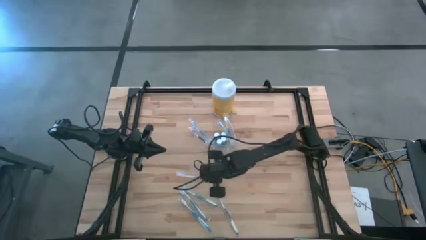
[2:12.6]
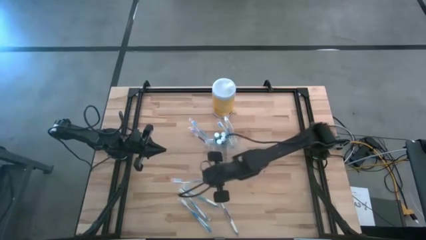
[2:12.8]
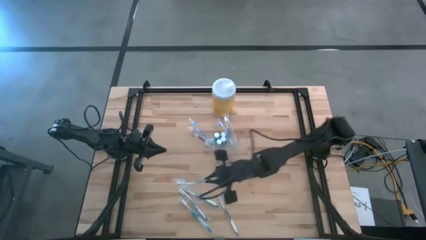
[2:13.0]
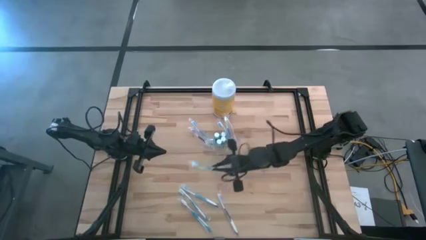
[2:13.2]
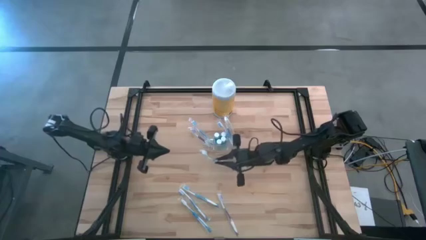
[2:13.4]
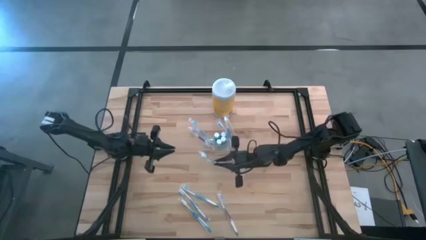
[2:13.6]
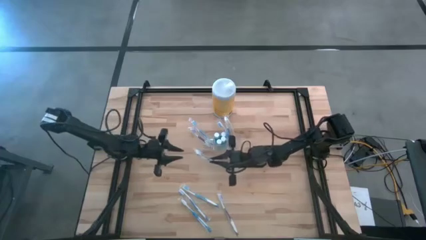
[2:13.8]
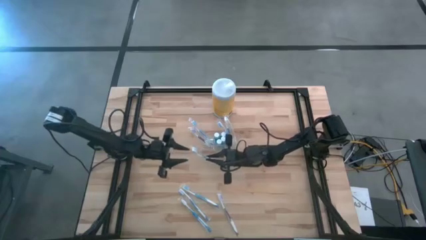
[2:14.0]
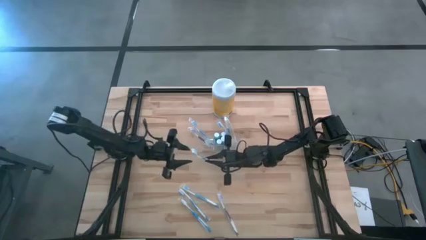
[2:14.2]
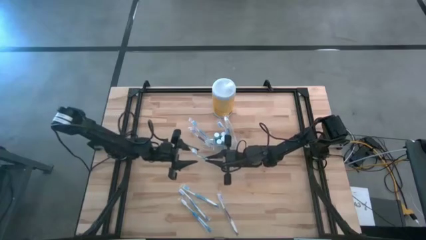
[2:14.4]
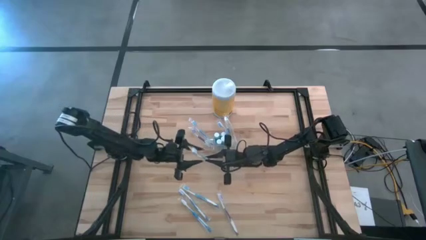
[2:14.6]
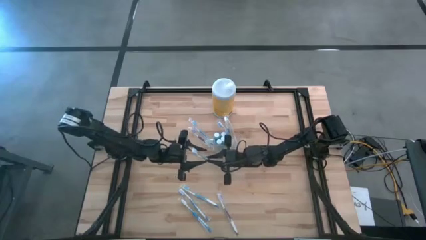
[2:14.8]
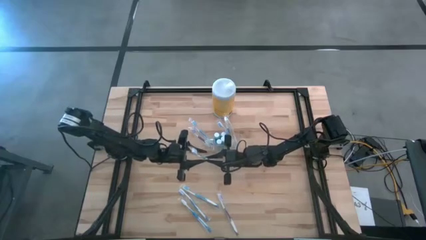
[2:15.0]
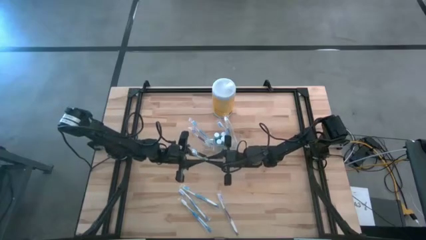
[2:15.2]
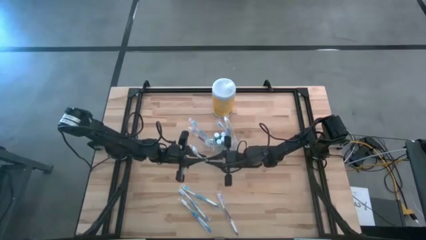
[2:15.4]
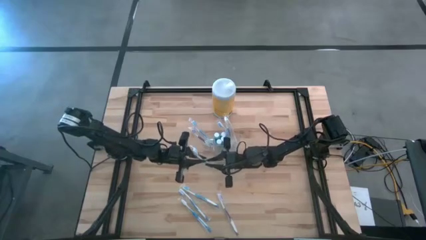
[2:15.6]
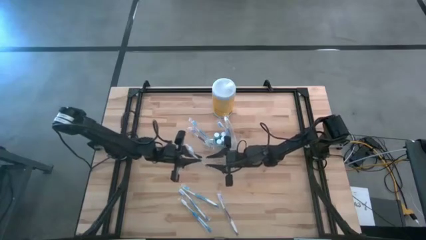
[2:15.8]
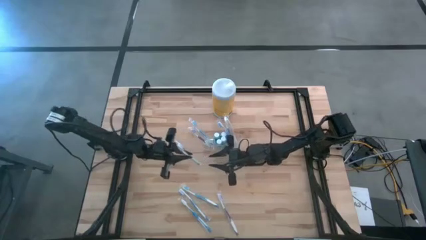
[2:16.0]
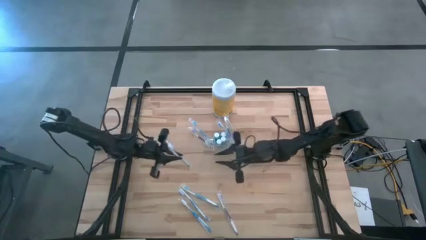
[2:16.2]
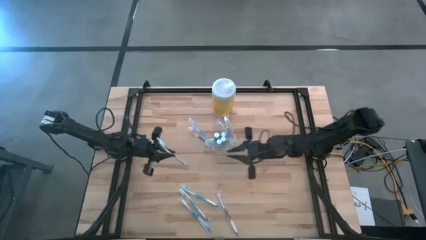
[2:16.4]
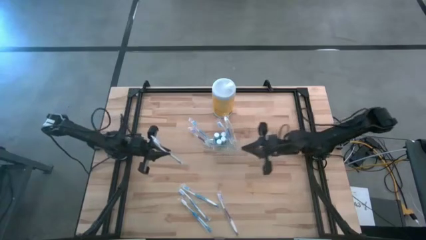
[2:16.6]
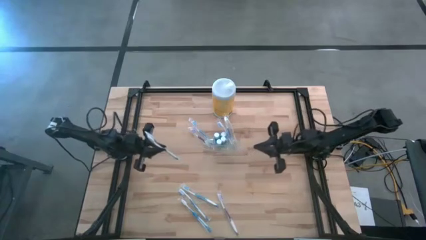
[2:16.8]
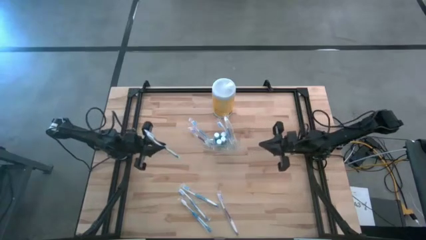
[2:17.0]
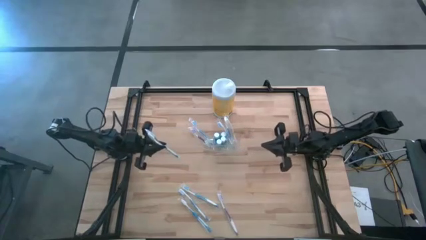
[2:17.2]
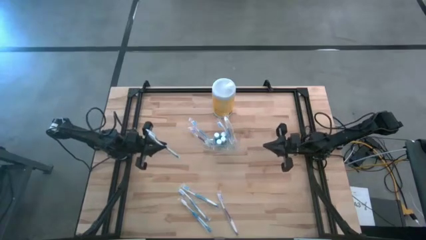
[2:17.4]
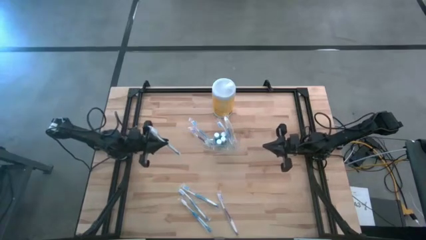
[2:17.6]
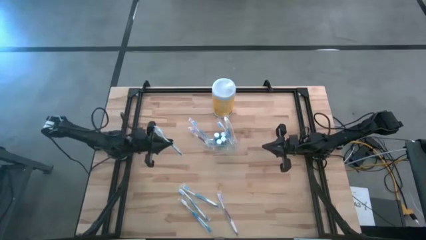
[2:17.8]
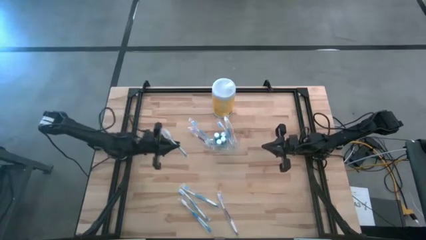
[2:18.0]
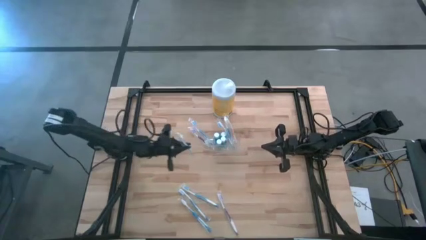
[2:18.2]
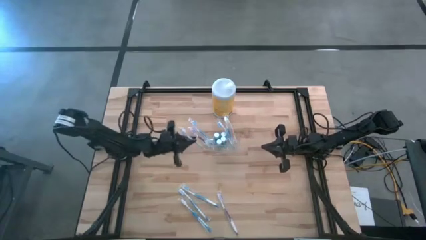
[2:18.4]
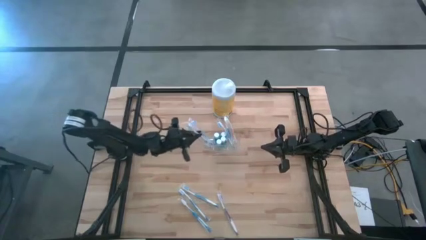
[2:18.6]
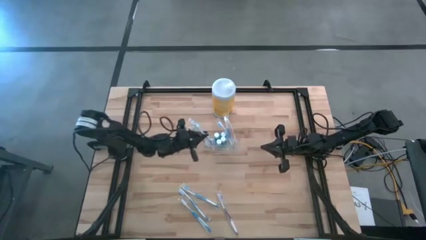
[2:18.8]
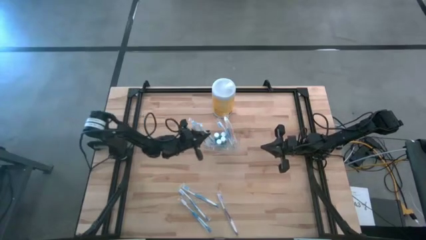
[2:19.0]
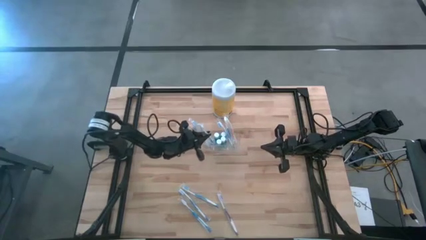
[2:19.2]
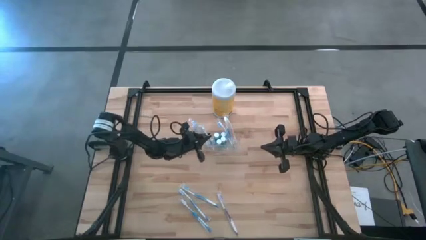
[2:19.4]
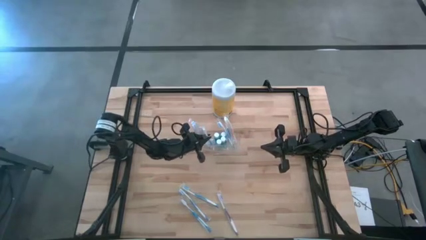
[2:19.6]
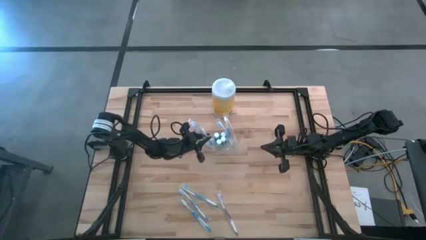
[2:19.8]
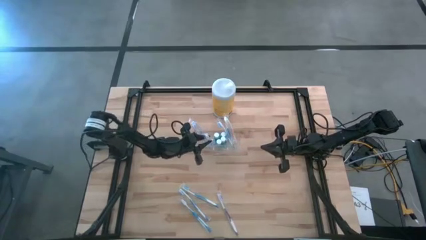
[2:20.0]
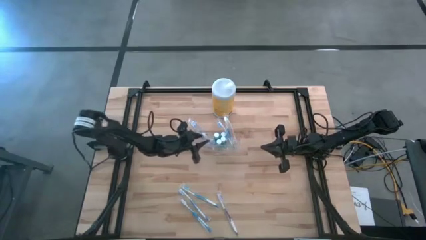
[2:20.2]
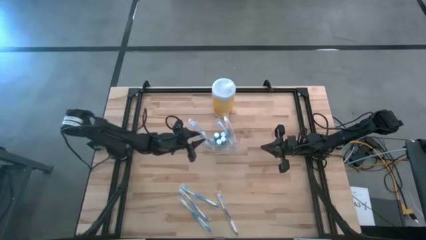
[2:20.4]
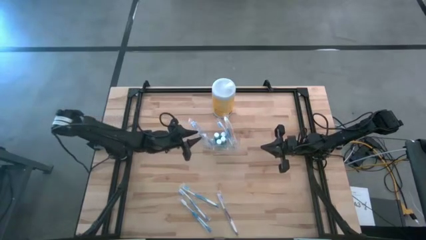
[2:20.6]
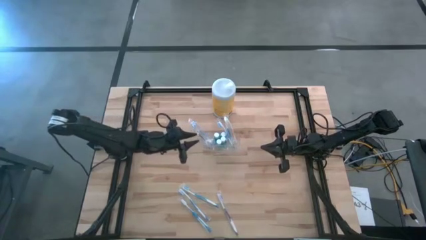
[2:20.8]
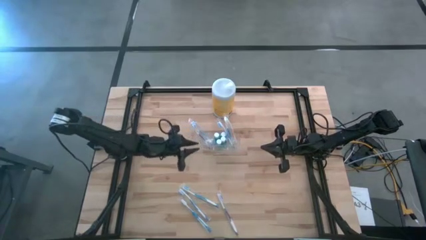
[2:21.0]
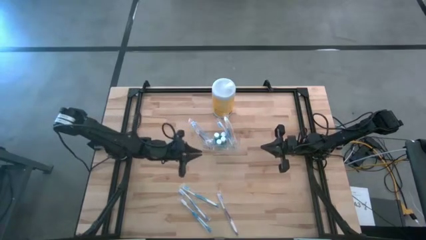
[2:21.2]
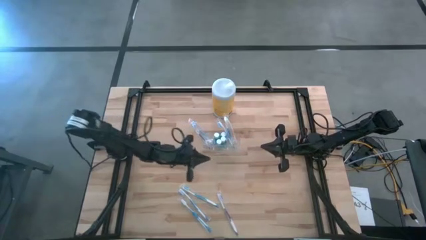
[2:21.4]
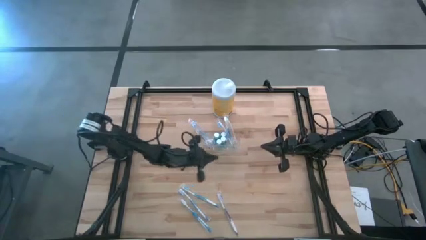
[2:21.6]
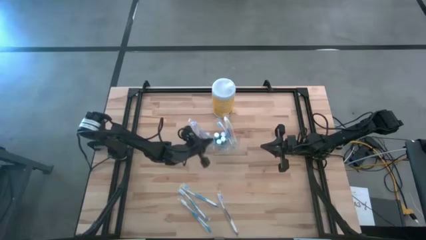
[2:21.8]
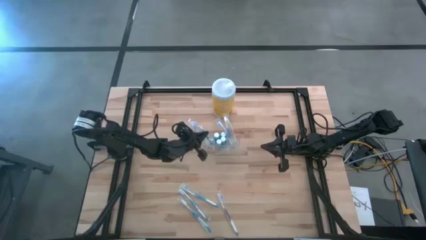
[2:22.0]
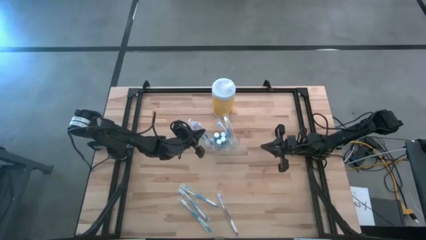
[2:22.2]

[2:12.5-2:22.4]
Task: Pick & Place toothbrushing station
Put the blue toothbrush into the transparent organizer

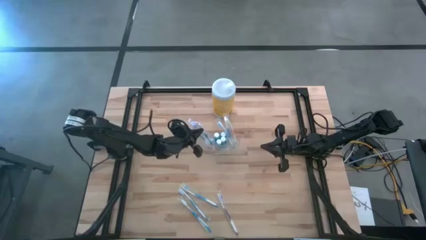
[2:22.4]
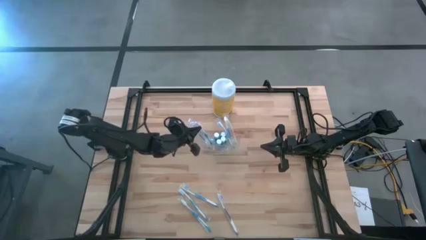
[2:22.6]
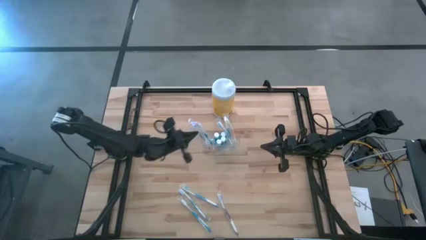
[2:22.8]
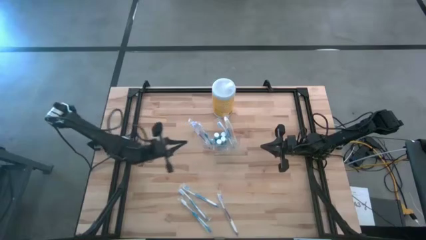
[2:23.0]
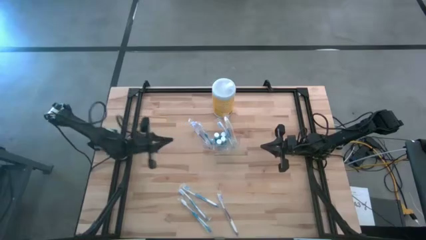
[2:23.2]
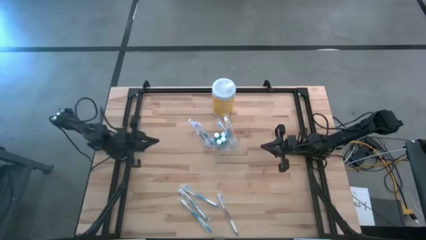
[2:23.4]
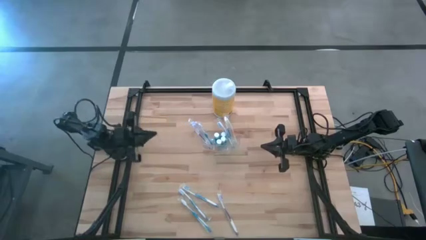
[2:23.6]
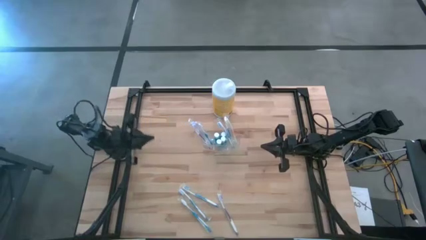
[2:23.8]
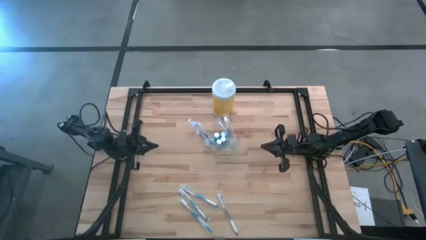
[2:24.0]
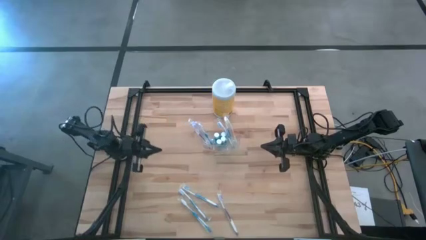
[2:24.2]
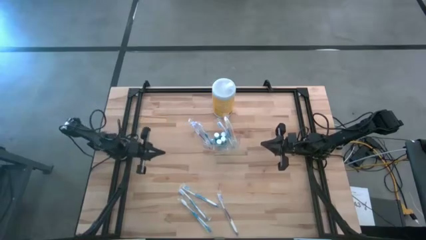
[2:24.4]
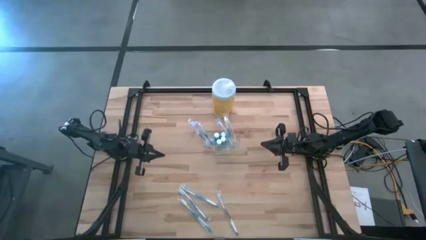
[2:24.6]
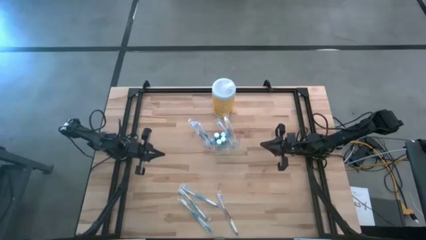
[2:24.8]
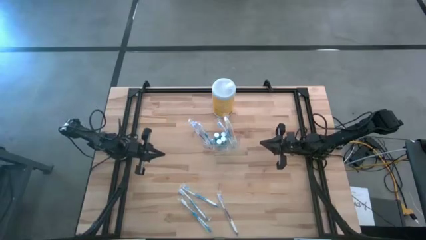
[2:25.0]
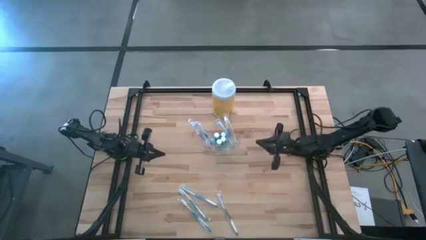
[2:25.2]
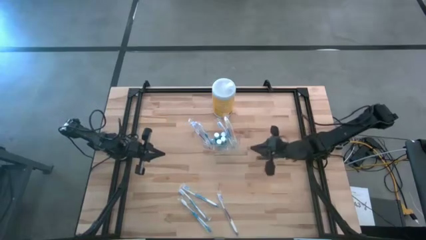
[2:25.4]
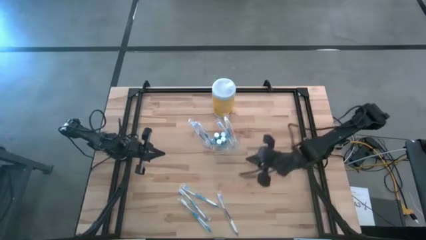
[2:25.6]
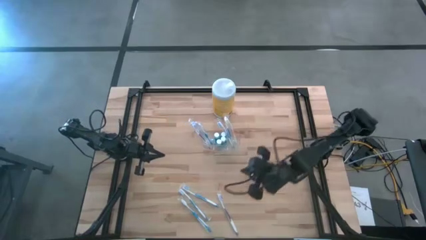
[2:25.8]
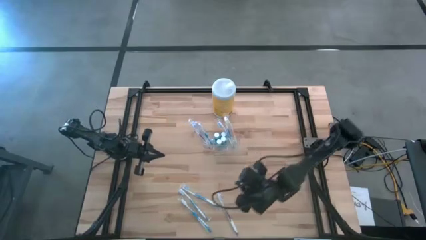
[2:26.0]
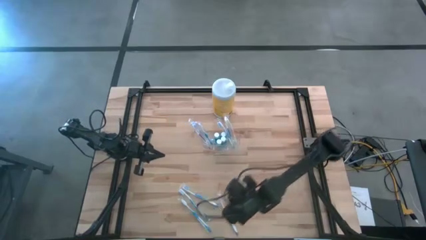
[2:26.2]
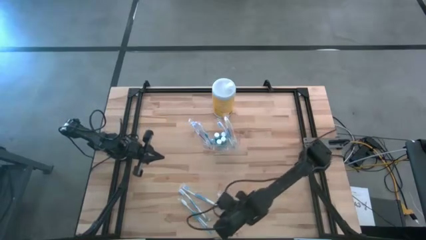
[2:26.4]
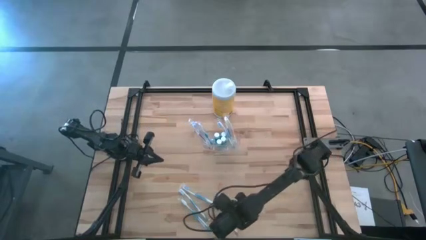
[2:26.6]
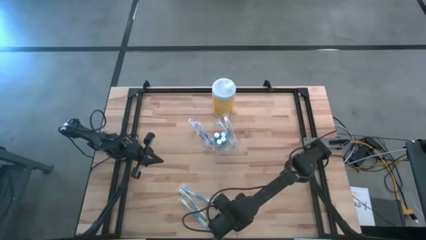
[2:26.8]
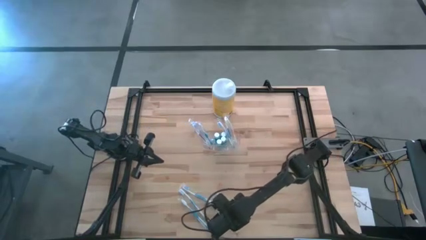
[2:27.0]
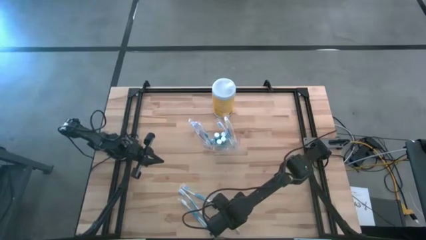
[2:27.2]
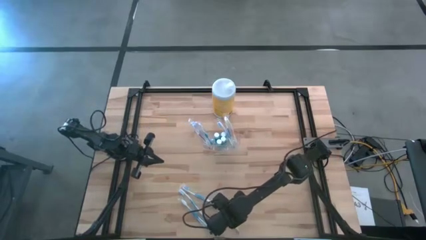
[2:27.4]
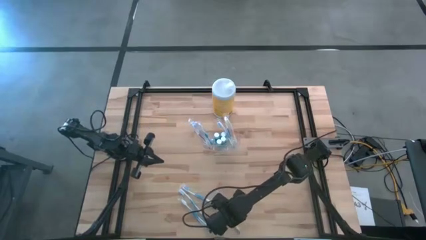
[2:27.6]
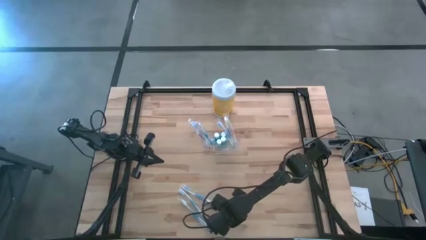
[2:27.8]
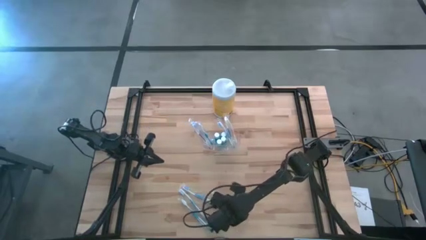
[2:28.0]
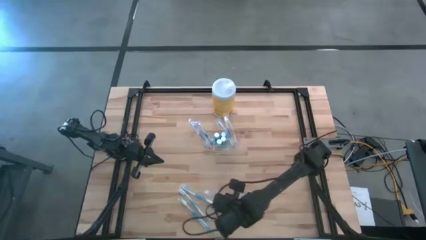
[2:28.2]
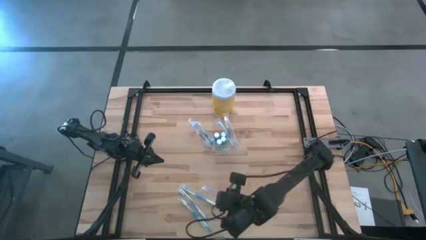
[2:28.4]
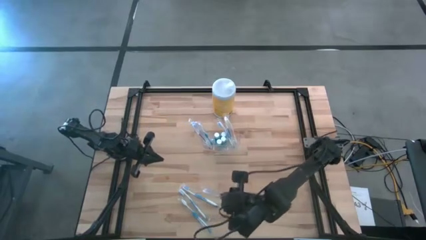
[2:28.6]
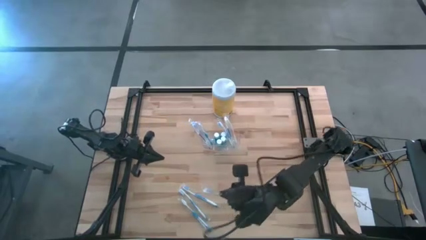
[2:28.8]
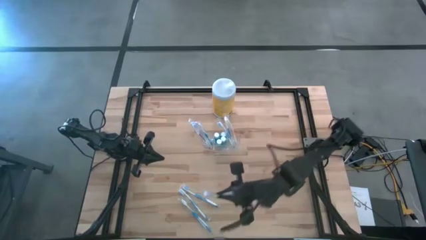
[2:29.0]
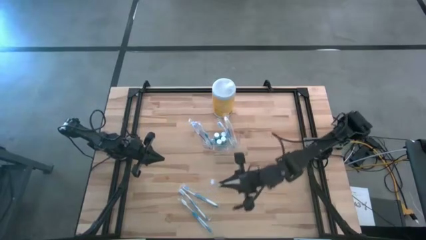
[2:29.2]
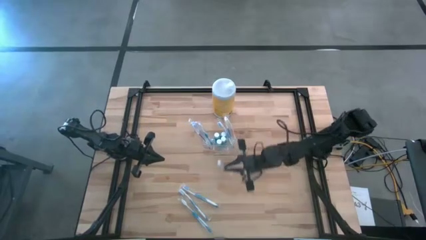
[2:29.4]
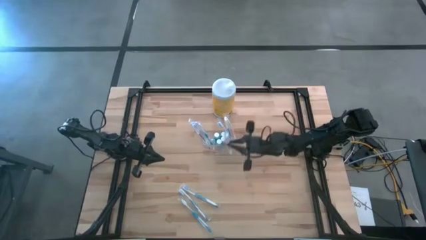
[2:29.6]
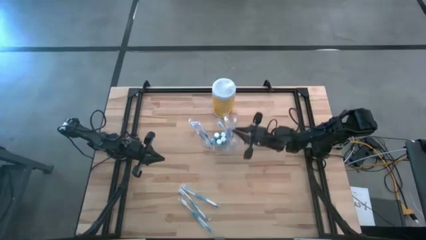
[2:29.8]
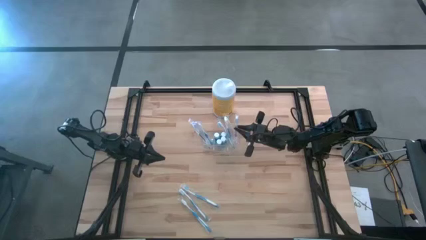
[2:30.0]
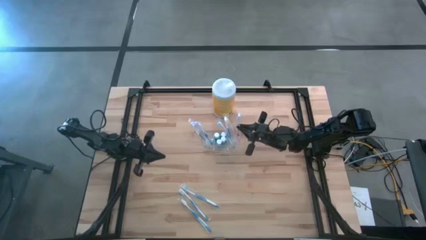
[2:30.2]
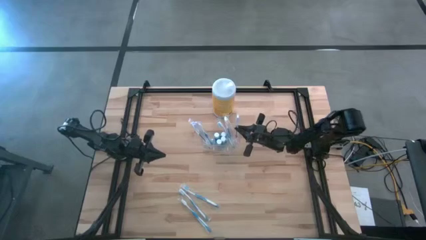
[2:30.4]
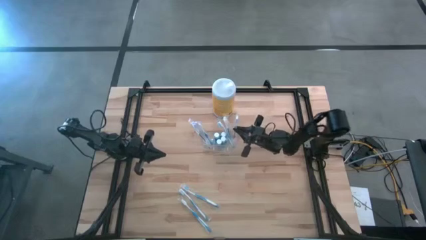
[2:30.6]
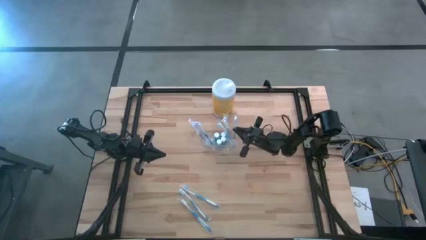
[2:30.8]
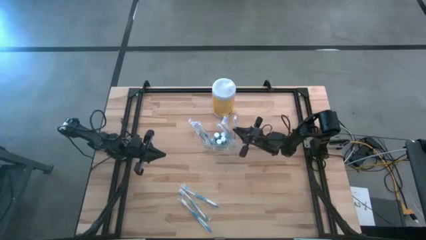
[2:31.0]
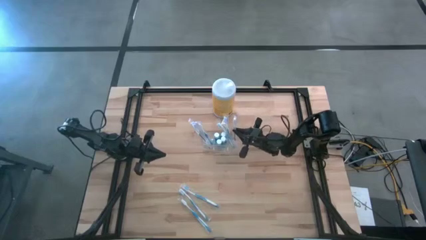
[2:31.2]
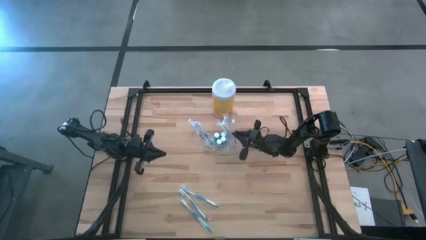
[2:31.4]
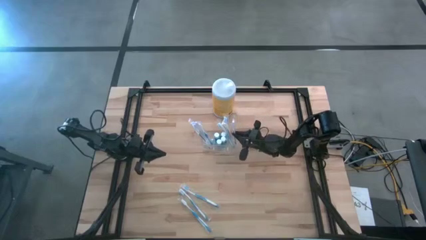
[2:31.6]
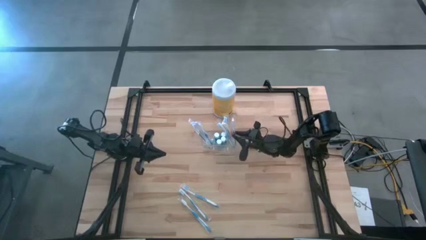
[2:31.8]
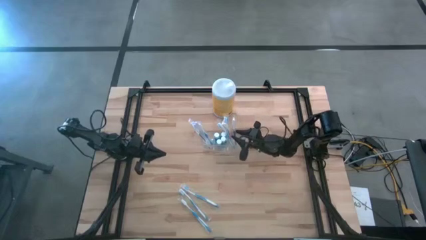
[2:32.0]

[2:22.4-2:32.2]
Put the purple toothbrush into the transparent organizer
